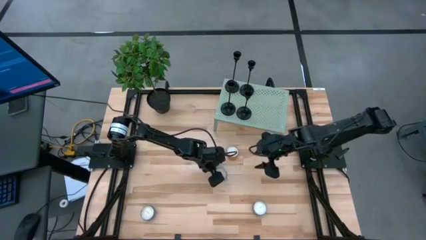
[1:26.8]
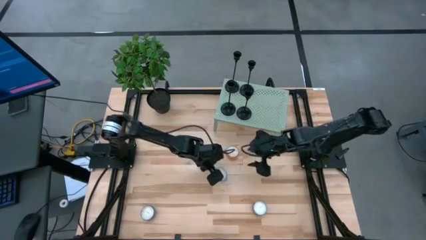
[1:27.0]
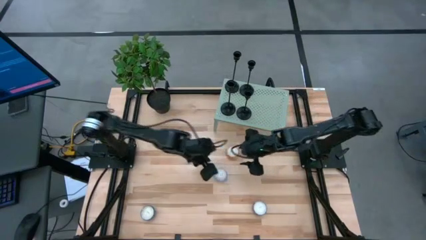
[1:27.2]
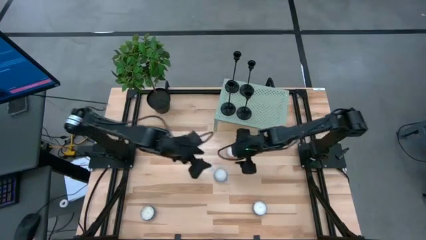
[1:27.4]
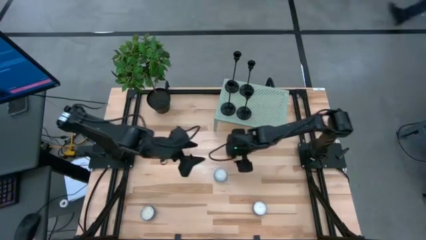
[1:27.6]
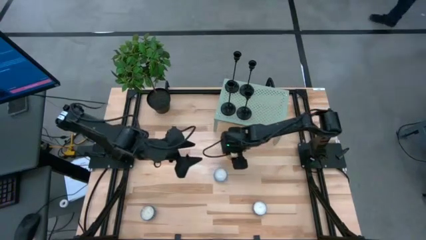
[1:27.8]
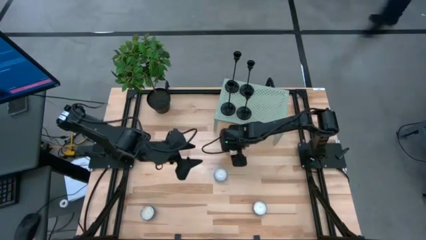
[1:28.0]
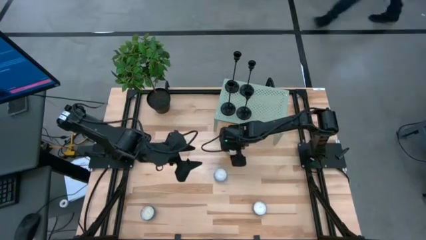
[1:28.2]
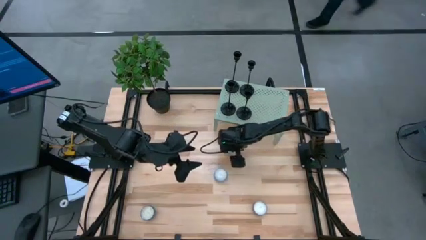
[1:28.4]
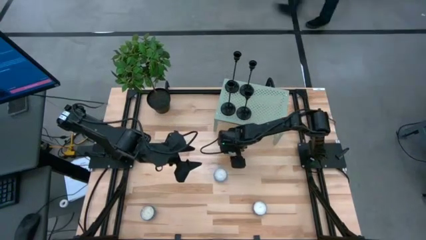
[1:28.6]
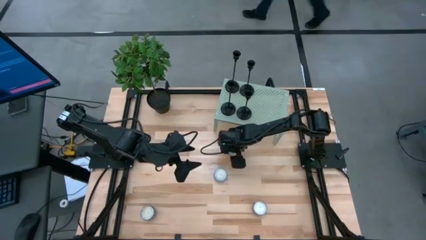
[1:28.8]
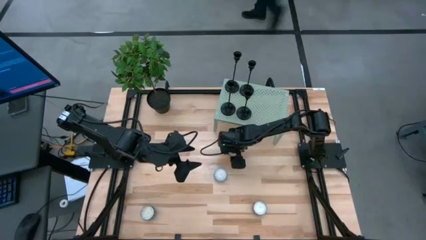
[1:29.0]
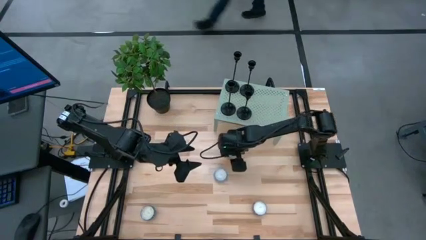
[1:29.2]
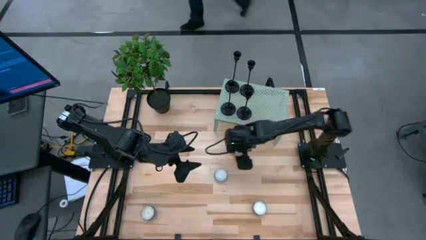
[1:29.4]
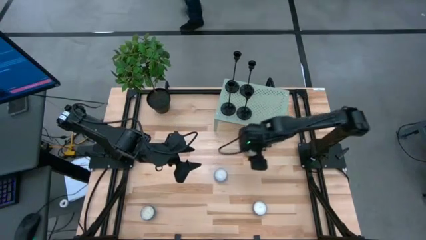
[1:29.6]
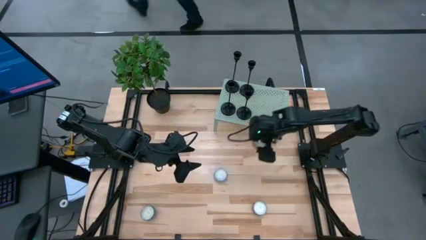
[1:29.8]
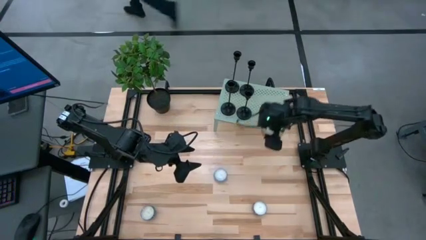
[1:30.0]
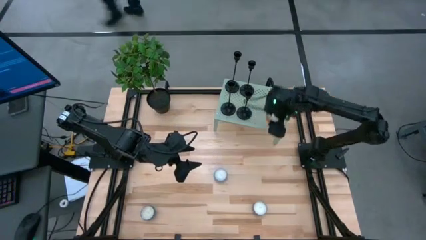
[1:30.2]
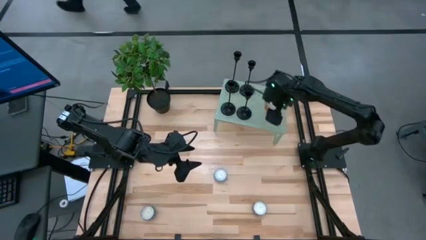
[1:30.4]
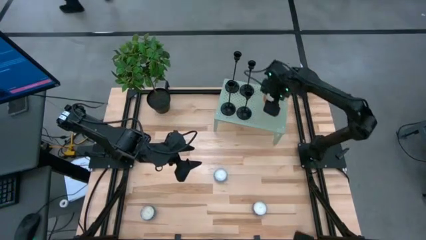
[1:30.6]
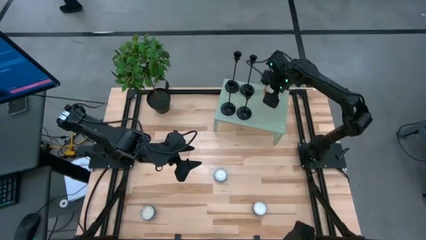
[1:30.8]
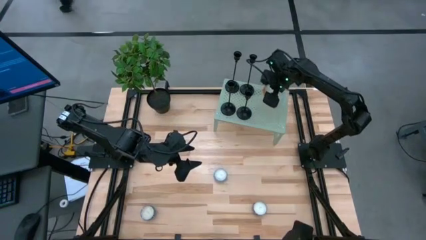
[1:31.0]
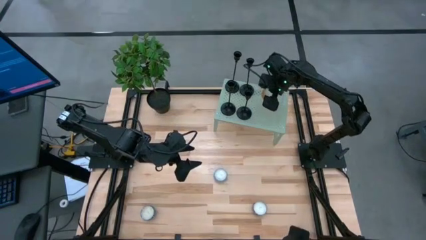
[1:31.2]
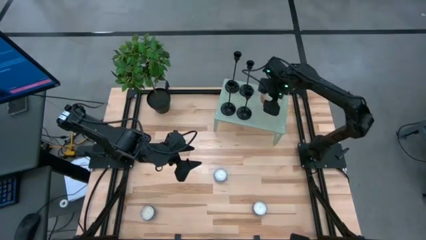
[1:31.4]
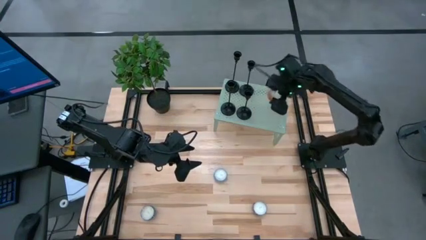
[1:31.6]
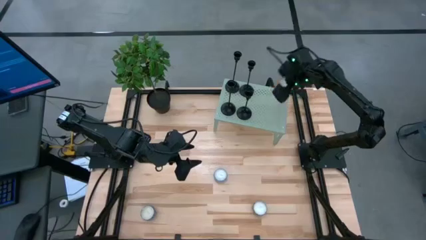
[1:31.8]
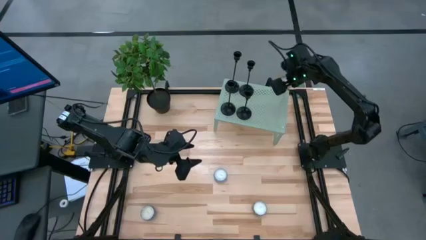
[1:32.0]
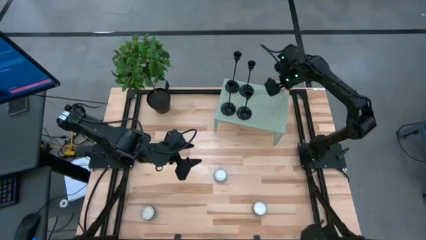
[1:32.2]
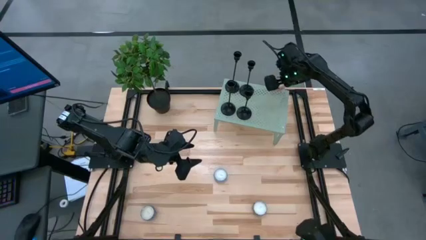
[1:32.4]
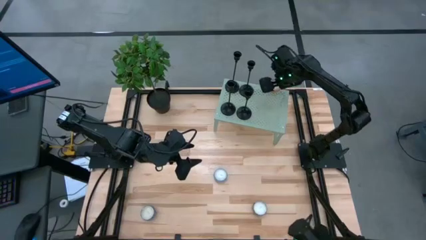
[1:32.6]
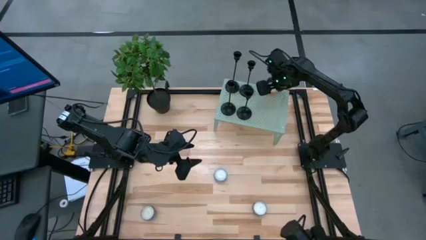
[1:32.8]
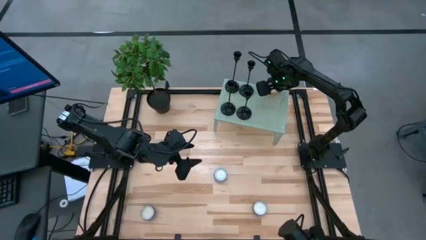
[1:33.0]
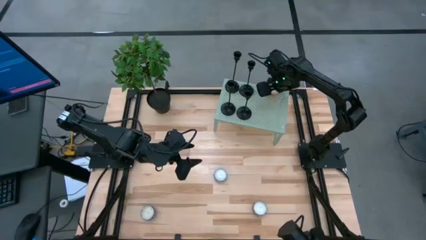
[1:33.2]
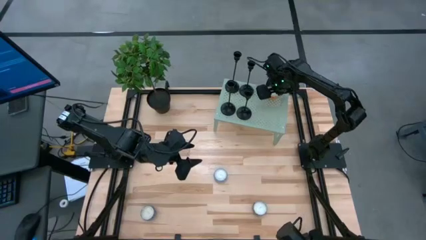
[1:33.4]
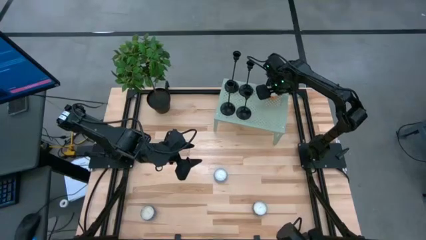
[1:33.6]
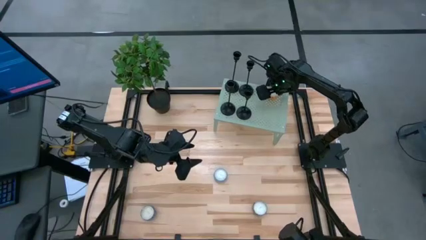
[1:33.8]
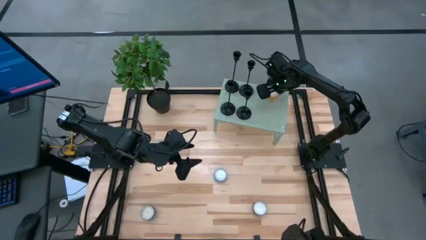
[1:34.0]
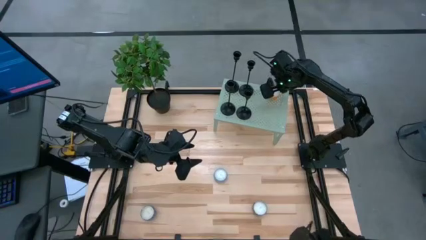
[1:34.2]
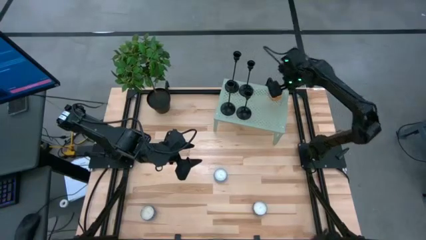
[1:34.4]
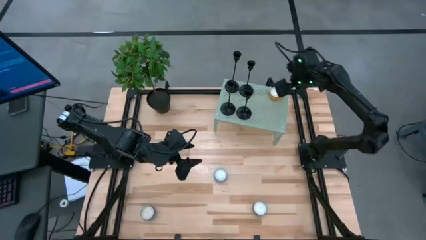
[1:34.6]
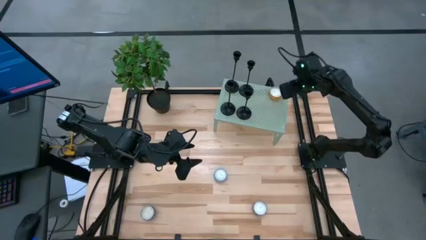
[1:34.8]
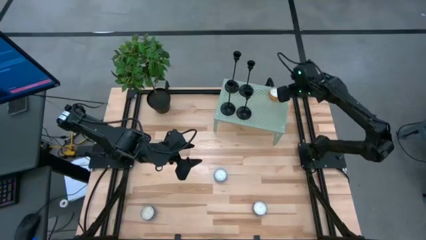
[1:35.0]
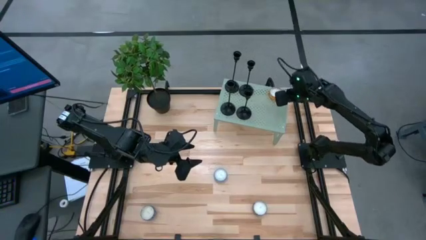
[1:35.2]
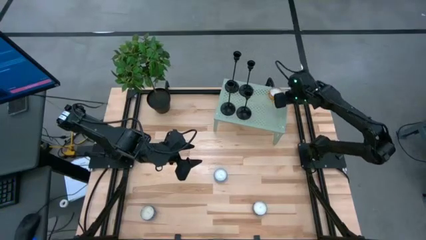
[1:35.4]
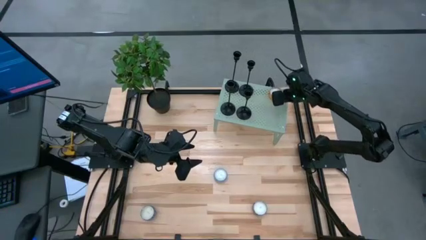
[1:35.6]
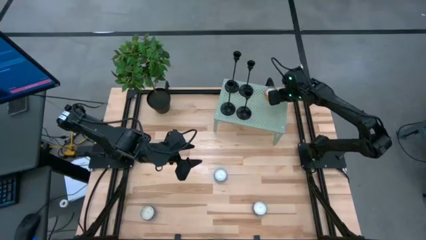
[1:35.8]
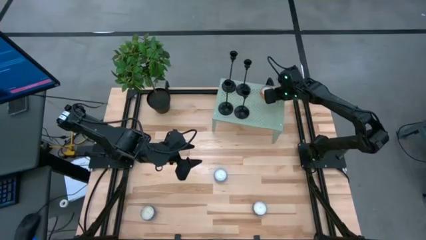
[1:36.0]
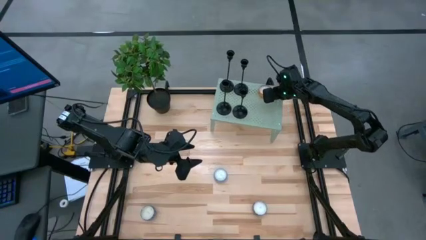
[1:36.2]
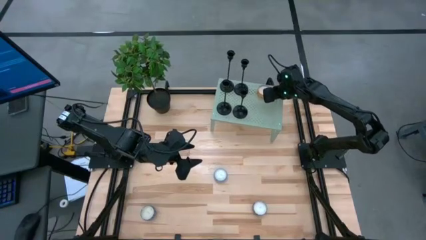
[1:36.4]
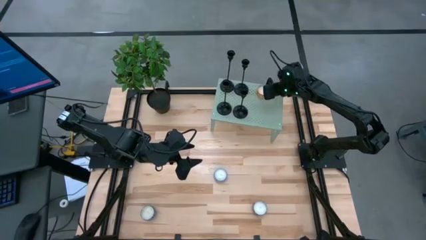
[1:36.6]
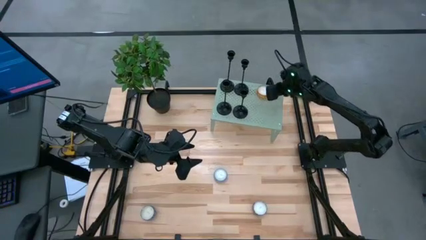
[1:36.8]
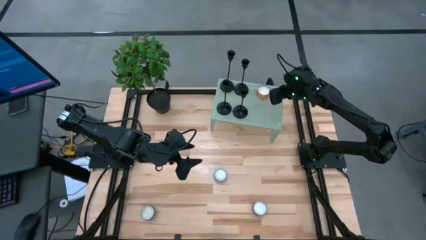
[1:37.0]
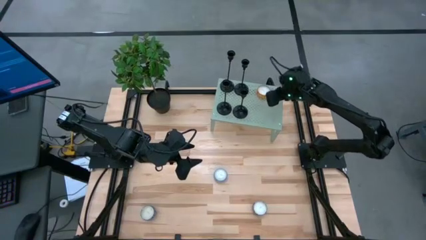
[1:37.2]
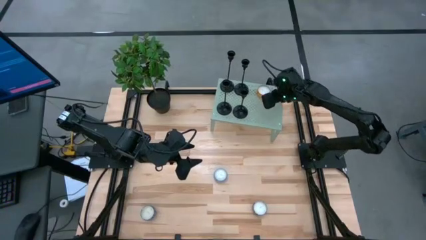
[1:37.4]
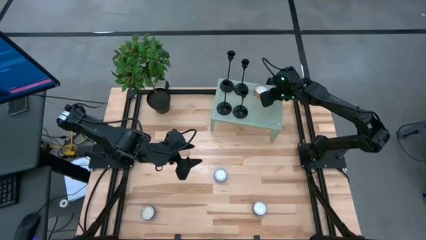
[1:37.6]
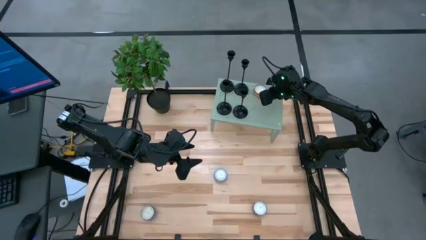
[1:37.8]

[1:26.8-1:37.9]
Task: Pick & Place candle stick holders
Put the orange scented candle on the shelf

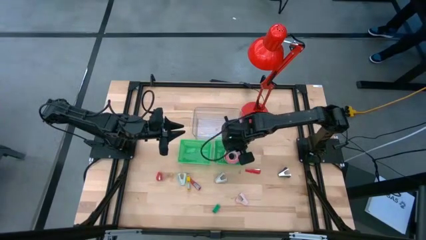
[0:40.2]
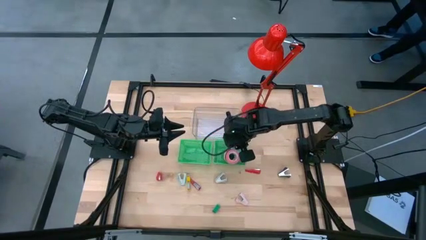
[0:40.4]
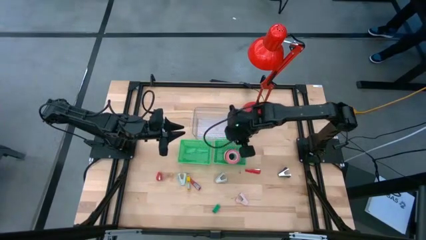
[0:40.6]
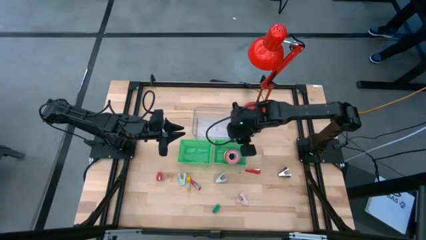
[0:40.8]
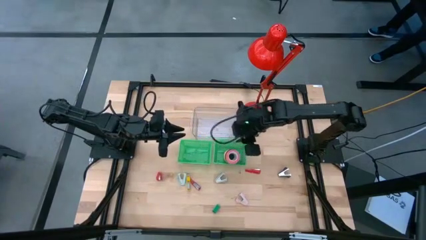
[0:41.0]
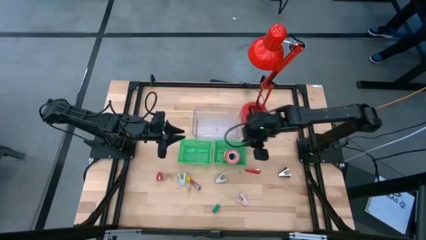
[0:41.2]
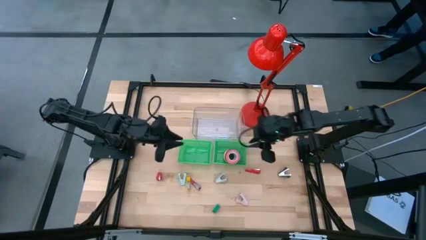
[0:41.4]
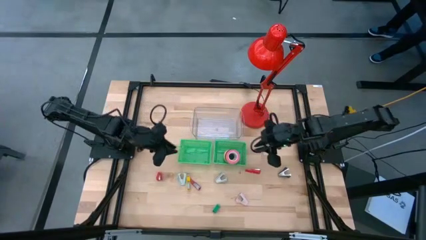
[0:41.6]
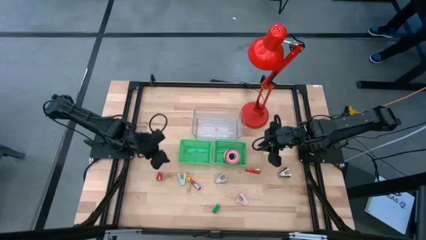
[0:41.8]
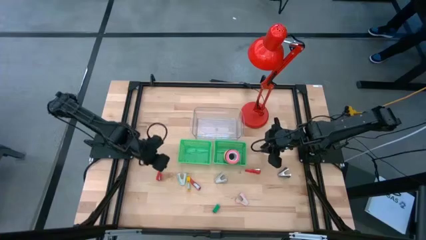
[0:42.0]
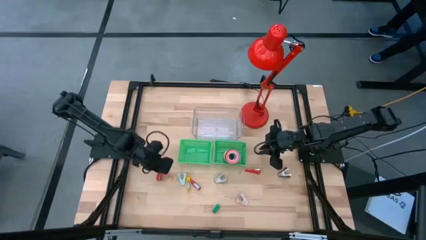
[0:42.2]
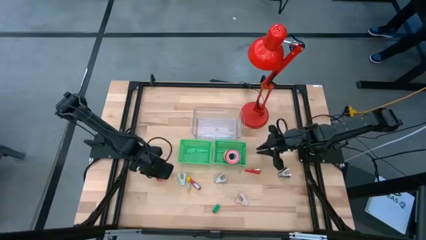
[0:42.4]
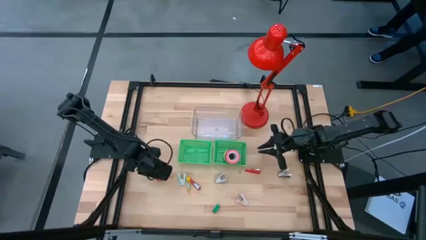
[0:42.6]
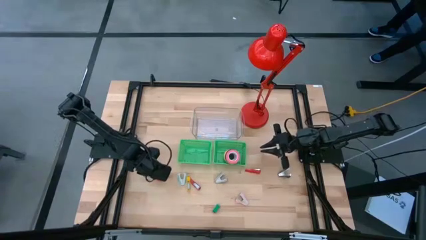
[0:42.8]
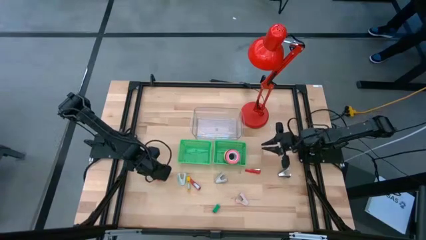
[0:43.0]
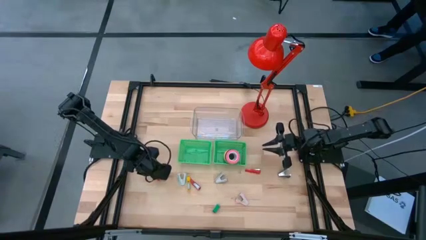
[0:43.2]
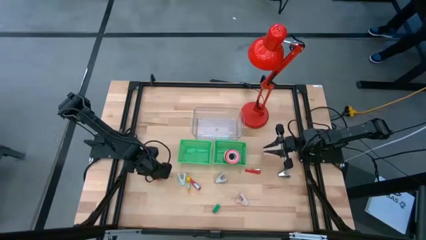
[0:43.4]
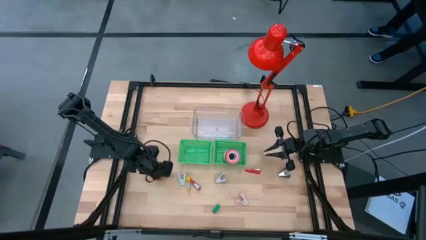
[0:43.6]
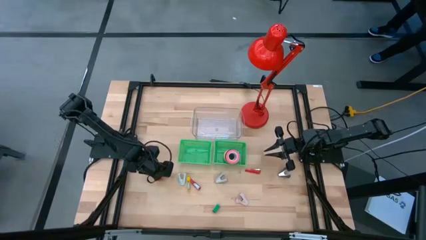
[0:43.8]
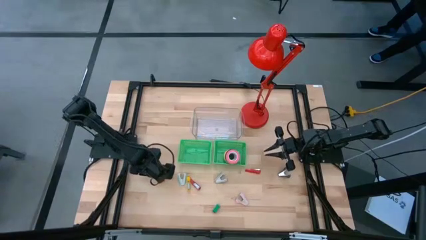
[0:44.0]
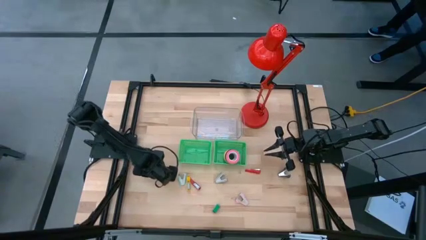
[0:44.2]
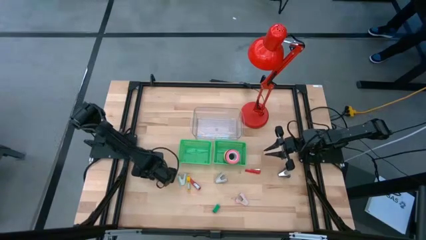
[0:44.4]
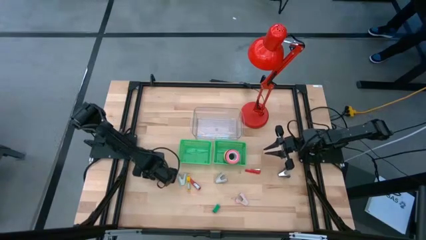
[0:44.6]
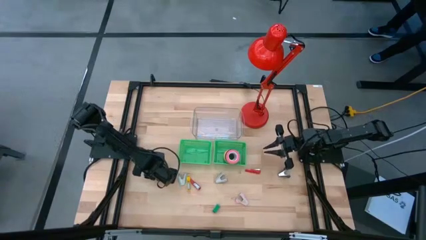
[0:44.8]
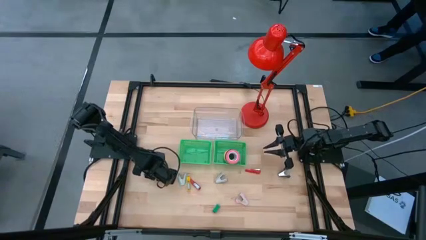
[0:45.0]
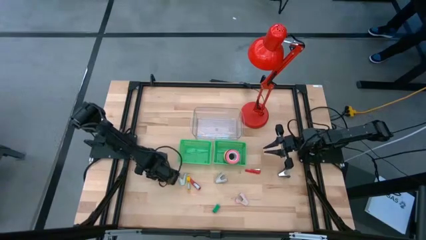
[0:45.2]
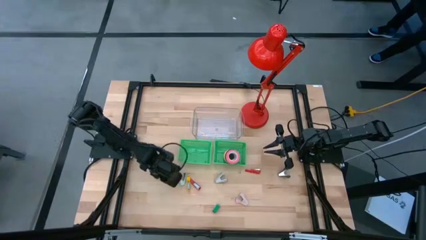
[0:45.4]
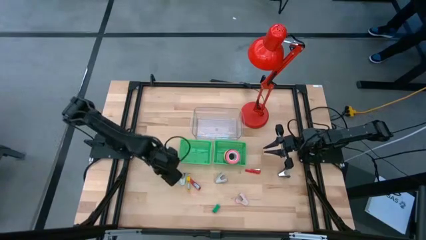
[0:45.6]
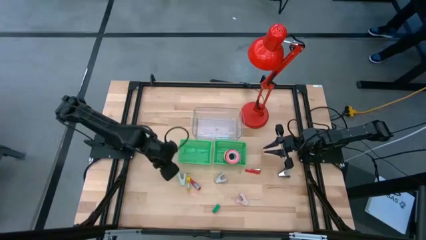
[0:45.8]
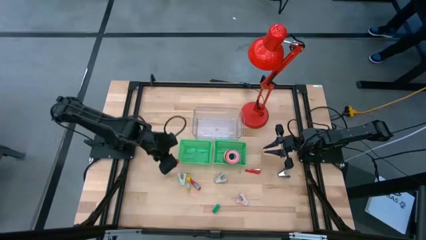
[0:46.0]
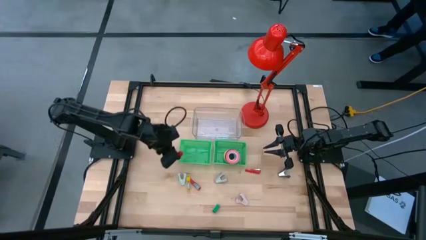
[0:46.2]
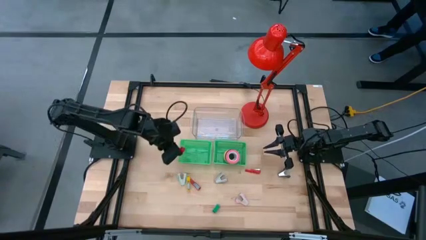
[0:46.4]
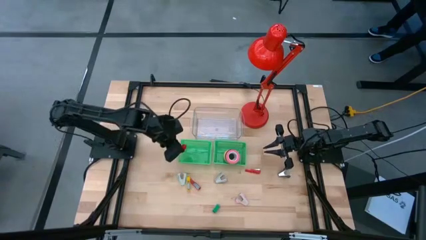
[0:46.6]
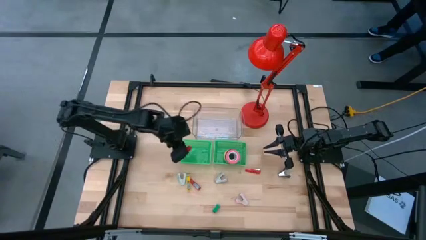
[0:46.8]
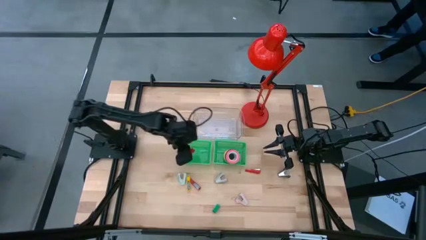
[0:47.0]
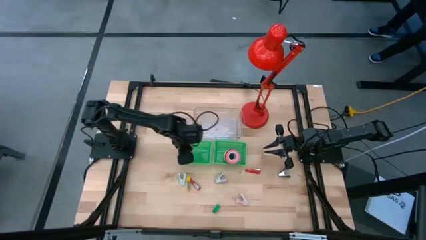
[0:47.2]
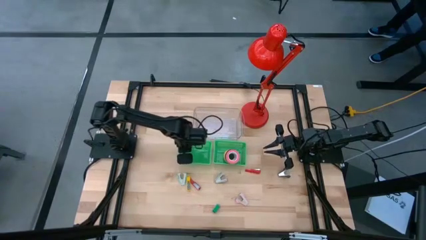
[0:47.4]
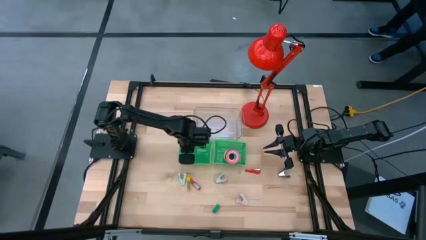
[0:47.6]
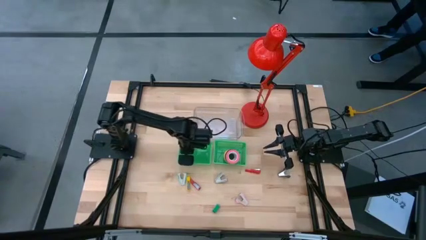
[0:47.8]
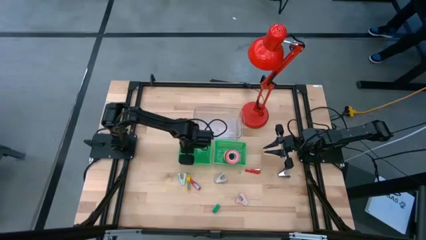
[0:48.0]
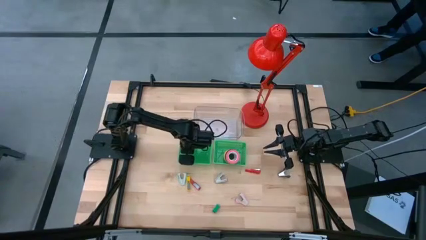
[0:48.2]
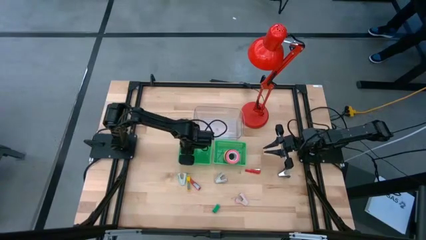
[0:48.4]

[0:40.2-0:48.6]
Task: Pick and place Stapler, Stapler remover, tape
Put the bottom left red stapler into the left green bin
